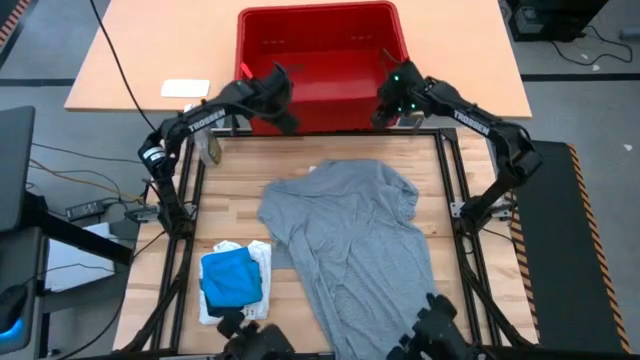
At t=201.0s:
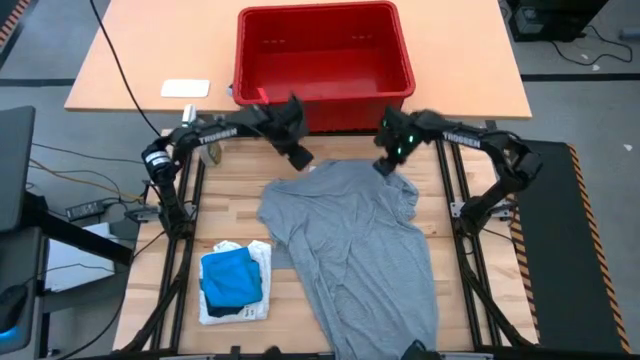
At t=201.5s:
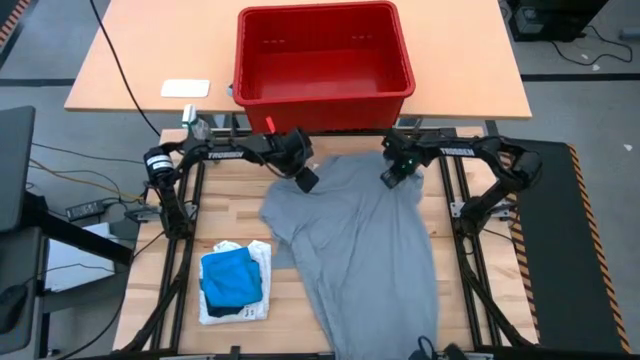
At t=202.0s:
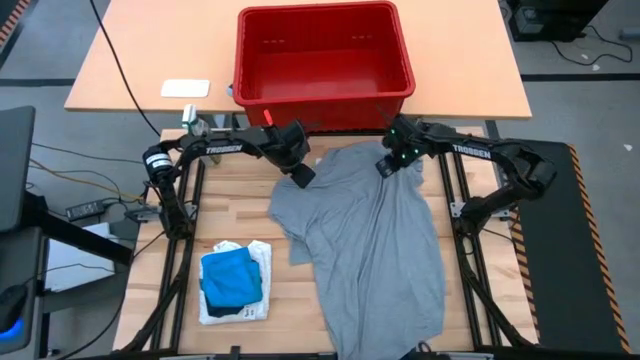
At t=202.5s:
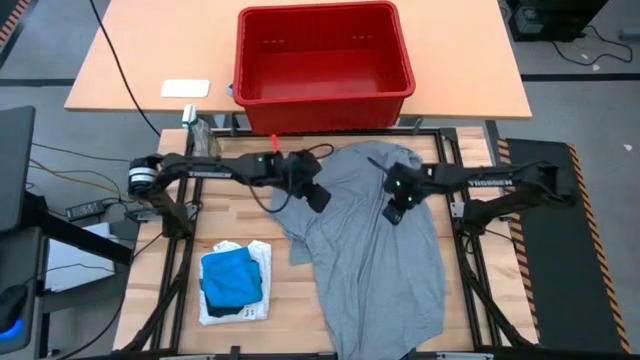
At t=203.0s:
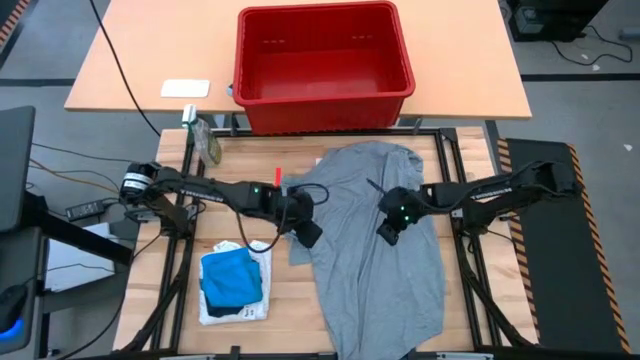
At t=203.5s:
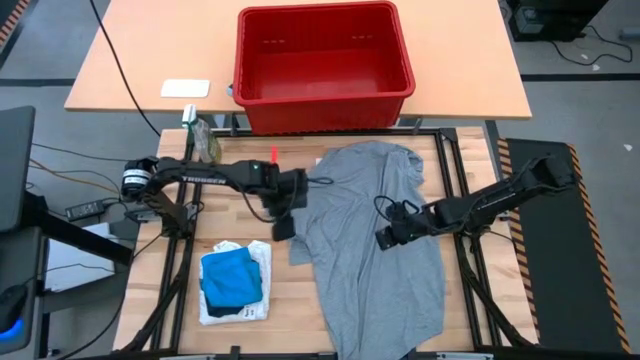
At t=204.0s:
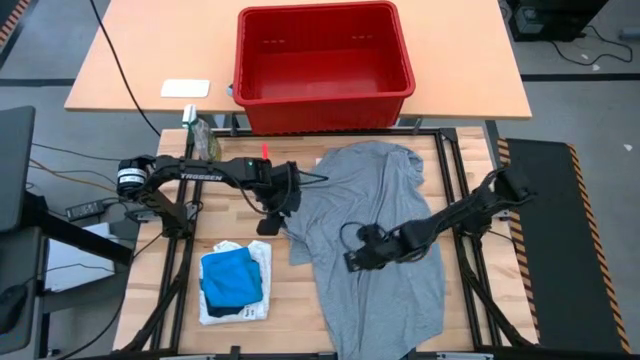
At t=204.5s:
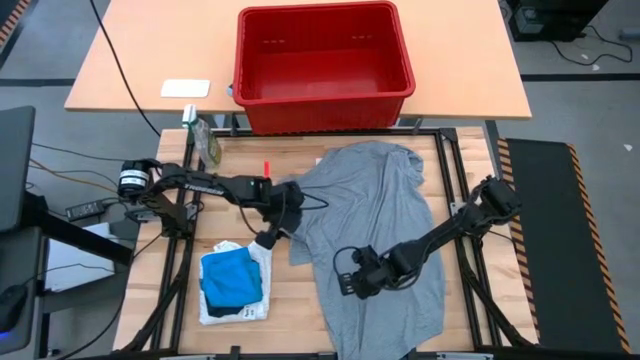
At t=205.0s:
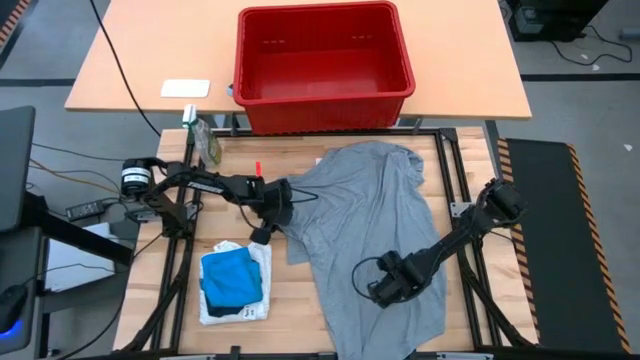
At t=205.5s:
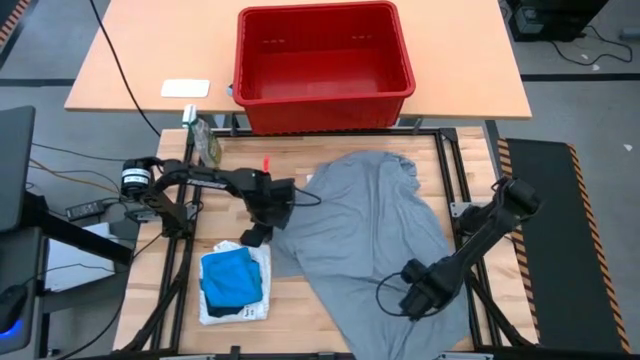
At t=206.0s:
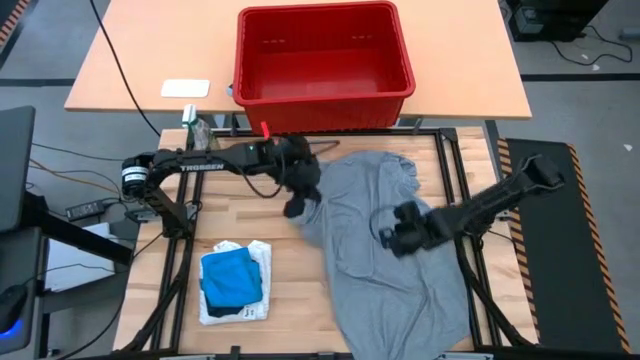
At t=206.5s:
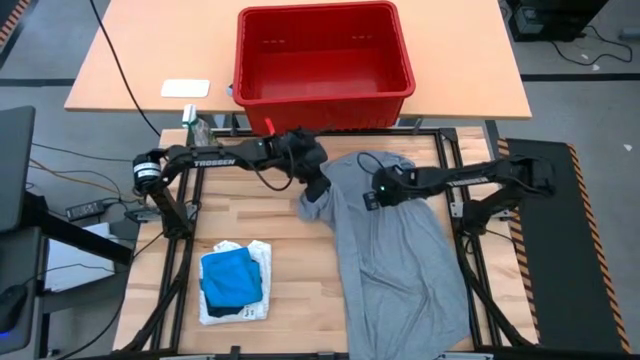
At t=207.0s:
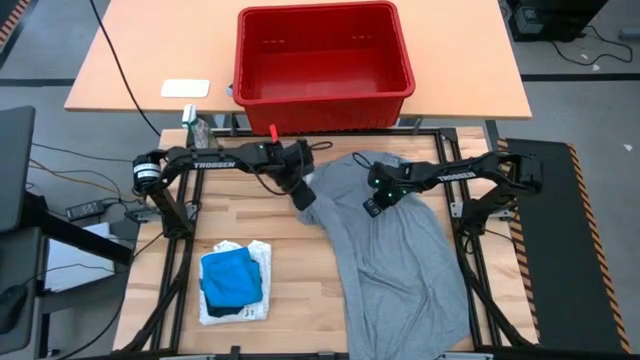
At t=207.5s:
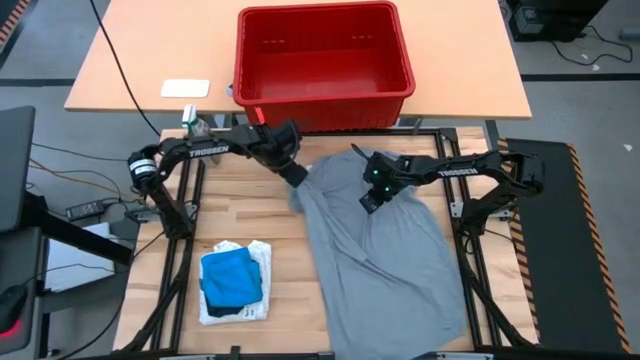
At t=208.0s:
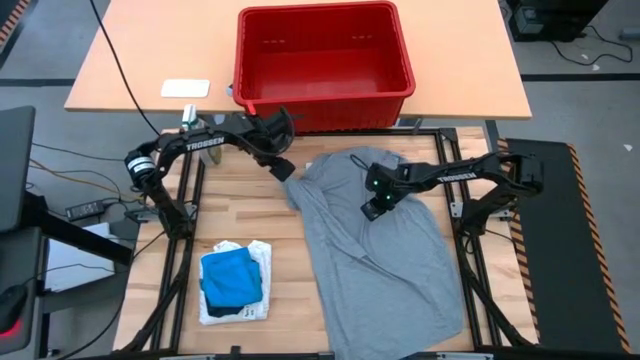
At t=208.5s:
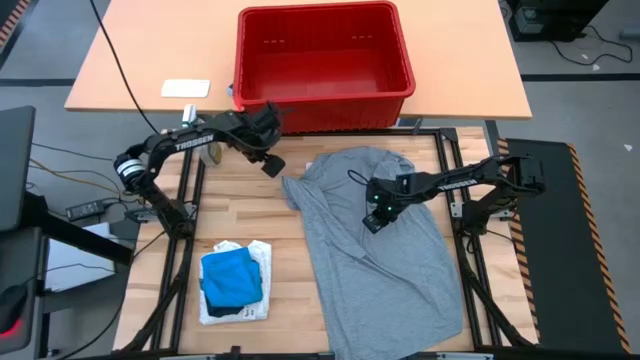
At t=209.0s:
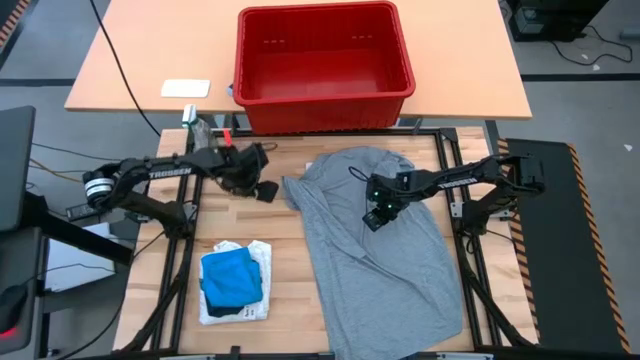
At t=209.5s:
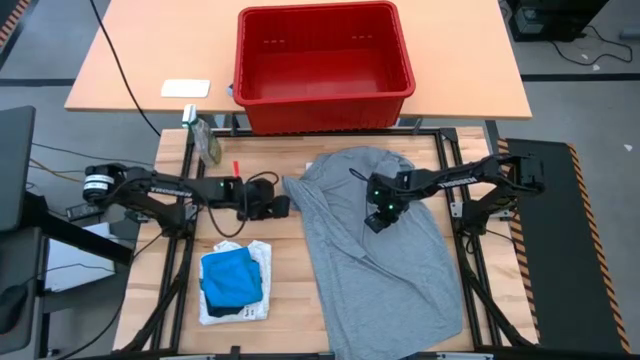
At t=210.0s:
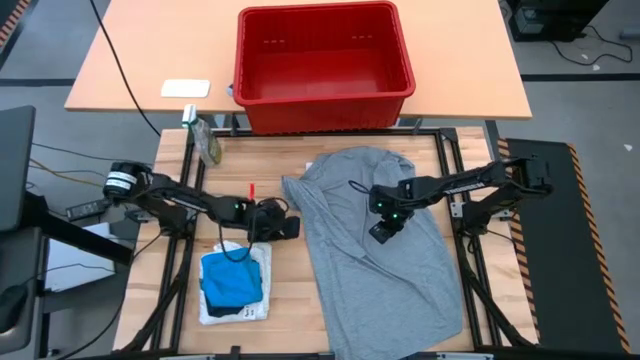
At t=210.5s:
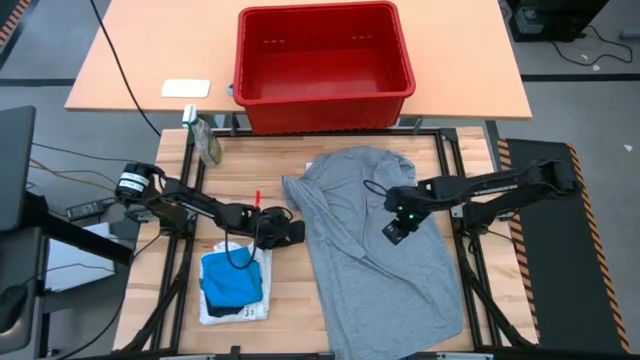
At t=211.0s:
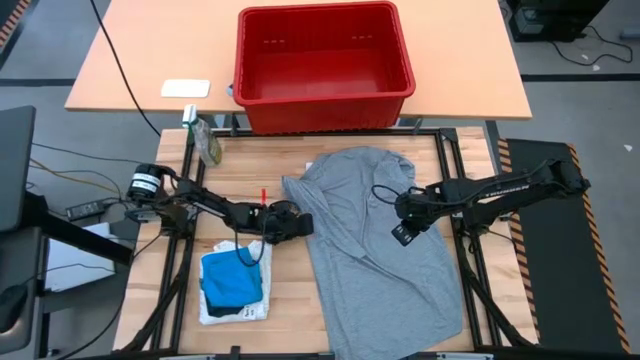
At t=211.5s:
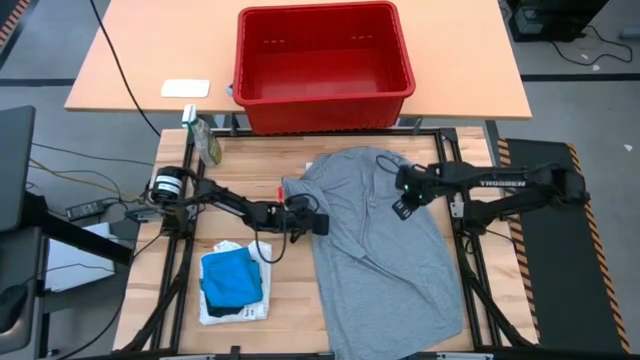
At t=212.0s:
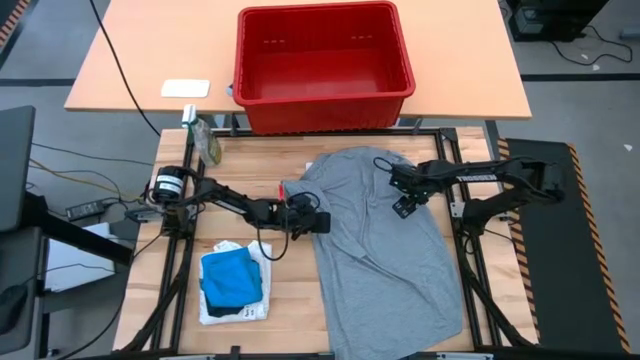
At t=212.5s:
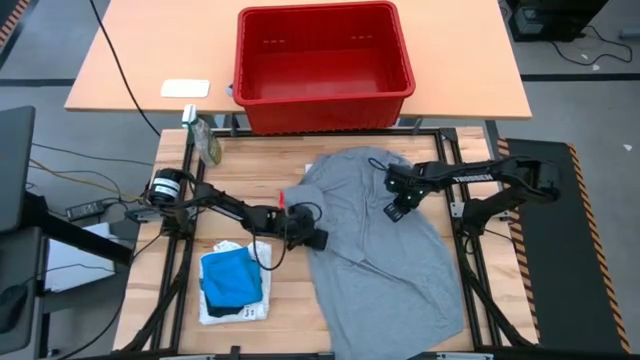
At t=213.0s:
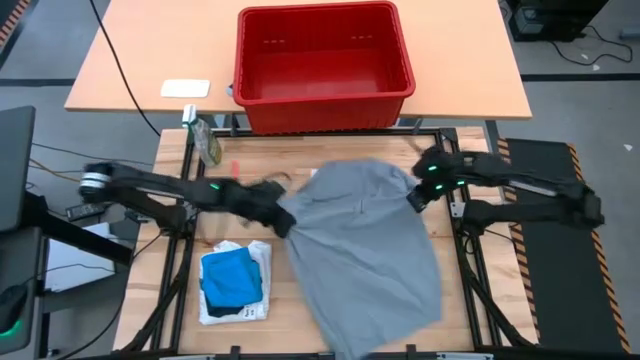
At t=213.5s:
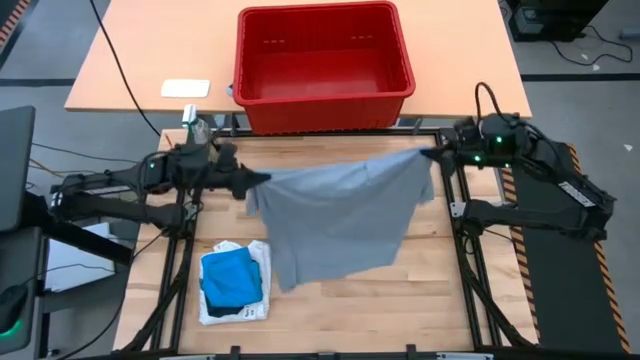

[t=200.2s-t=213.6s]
Task: Fold laundry
Fold the grey shirt on the table

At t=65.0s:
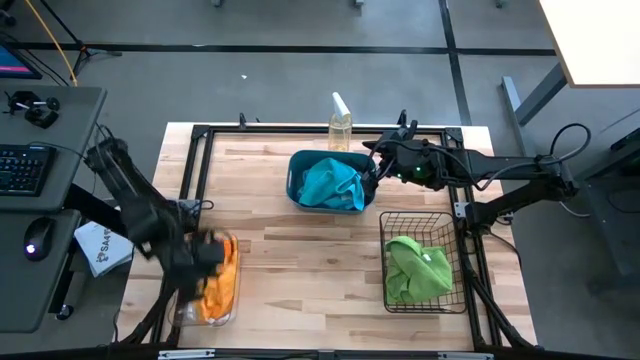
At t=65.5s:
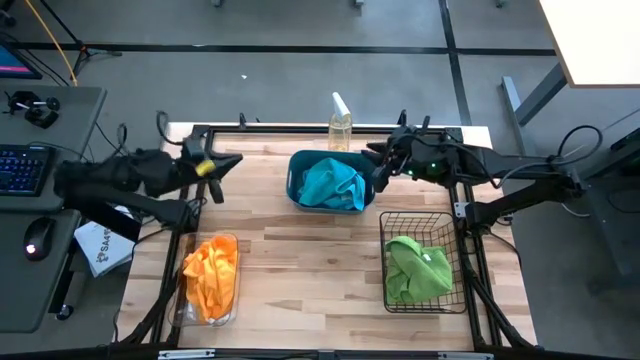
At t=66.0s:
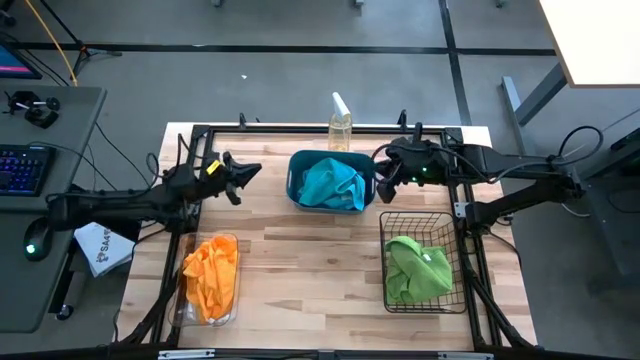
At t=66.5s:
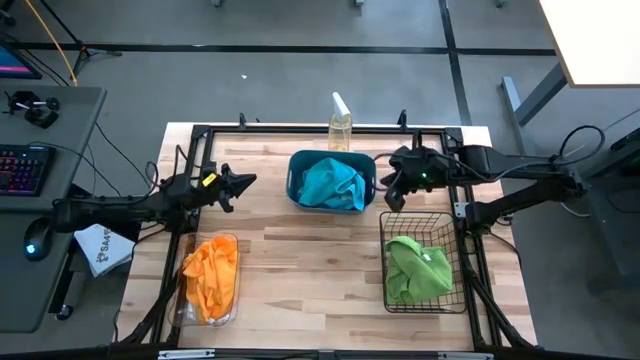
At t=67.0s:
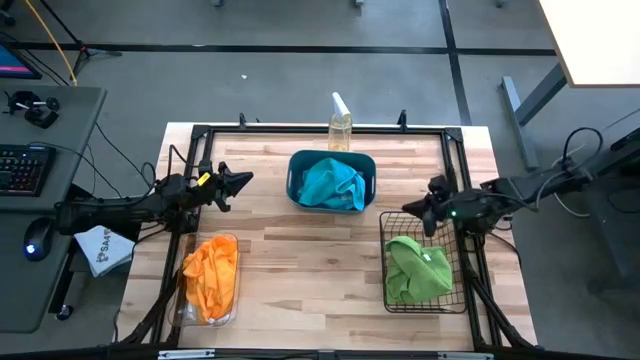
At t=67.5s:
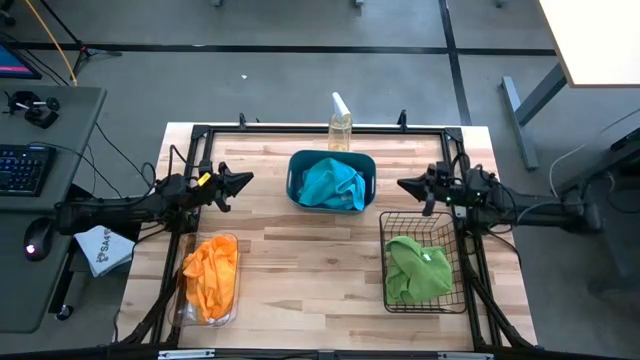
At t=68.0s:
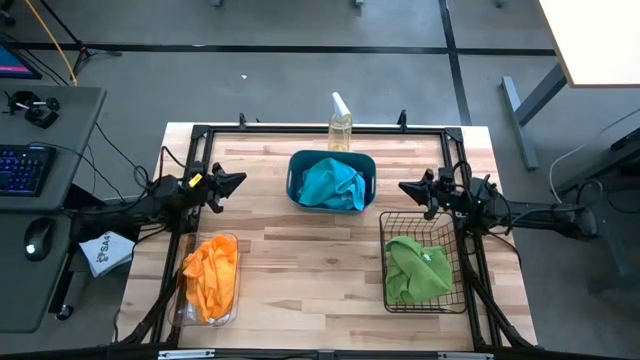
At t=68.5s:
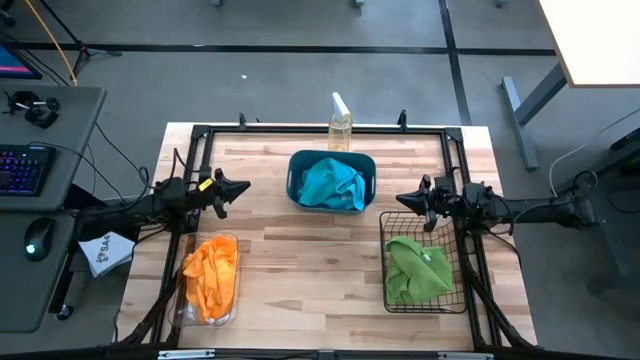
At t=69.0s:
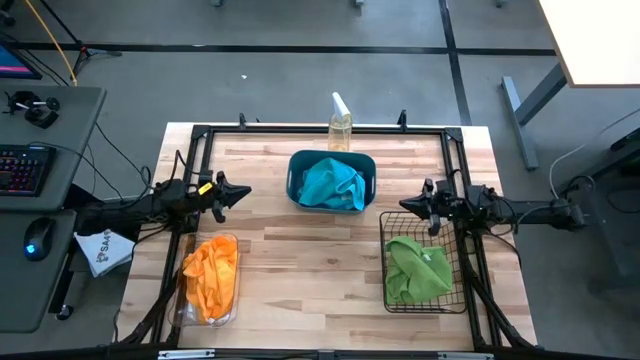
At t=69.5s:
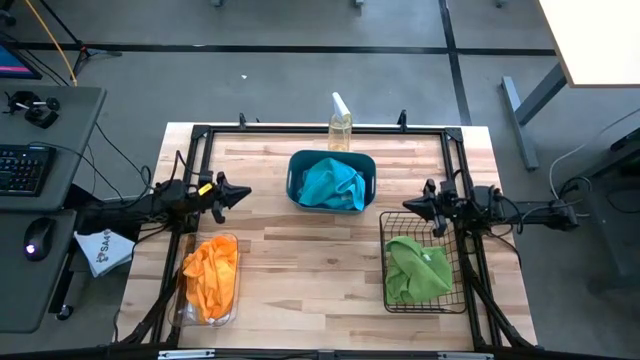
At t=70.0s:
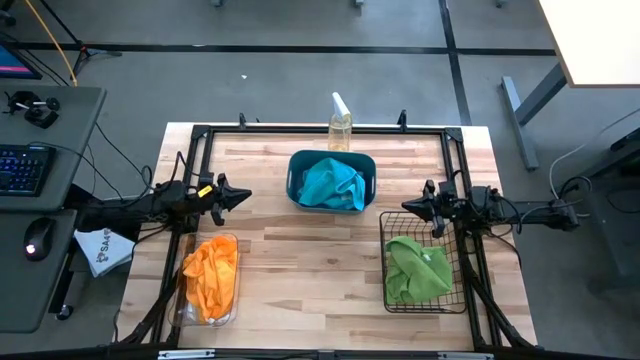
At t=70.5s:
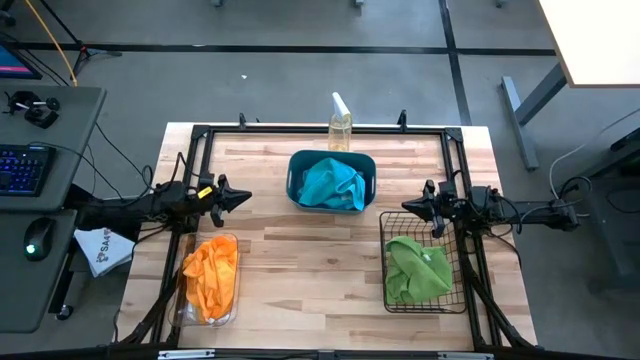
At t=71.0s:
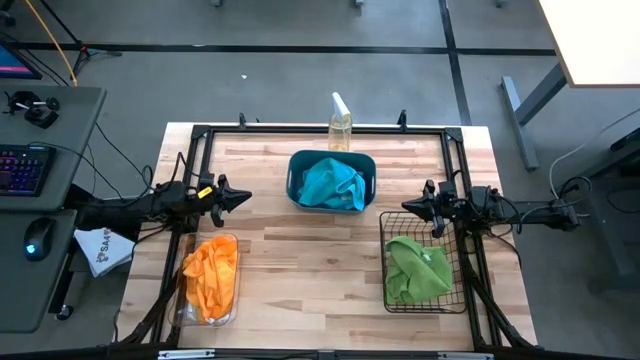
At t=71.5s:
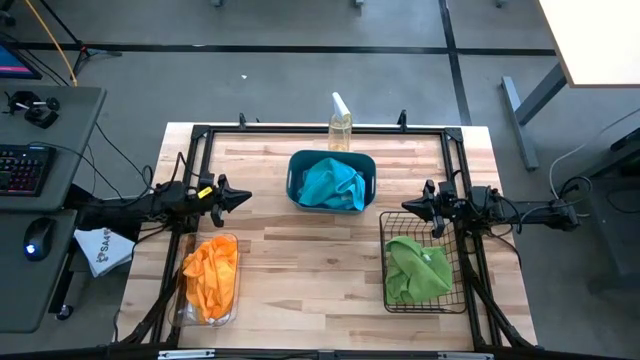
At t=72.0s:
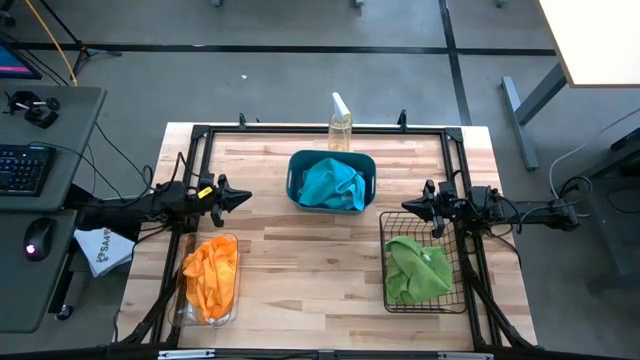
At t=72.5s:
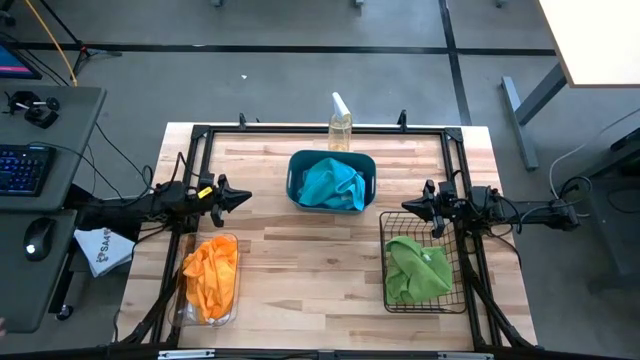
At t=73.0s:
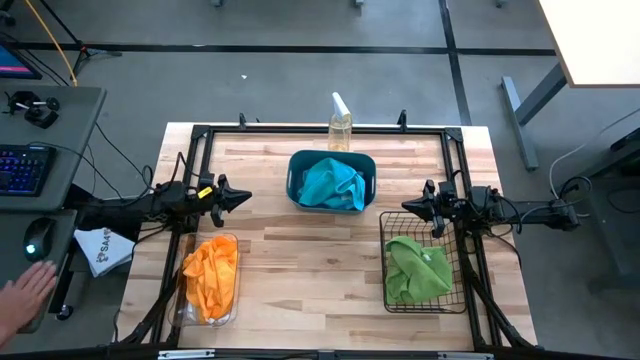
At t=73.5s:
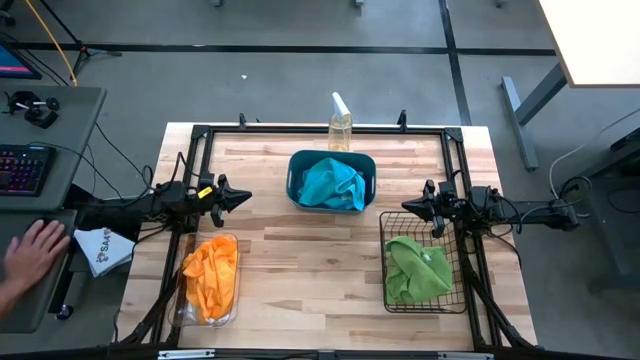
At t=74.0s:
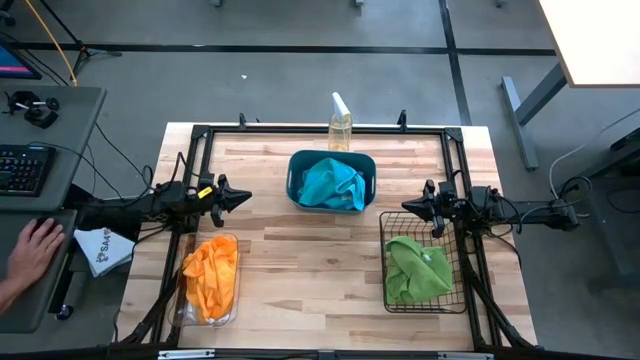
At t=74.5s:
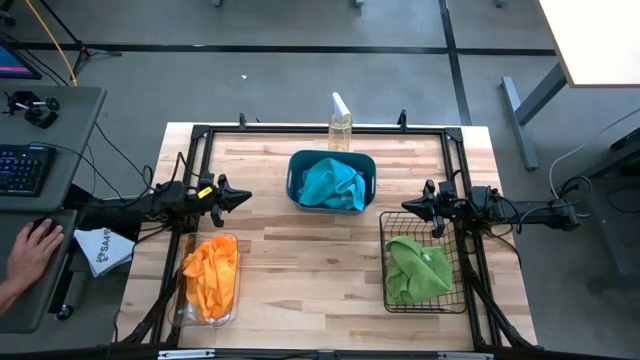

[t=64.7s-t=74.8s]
Task: Sort microfiber towel by color & place in baskets
Return to Home Position
